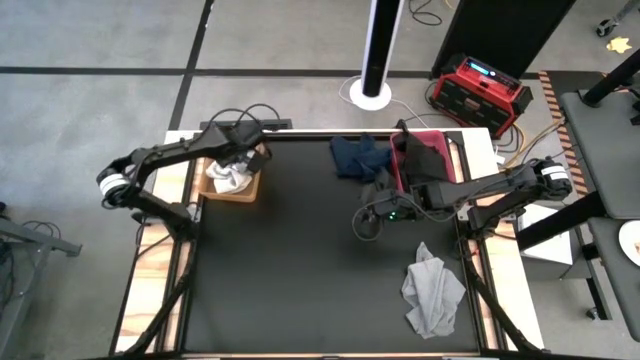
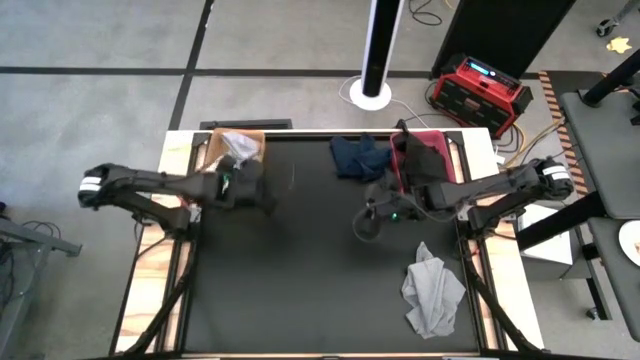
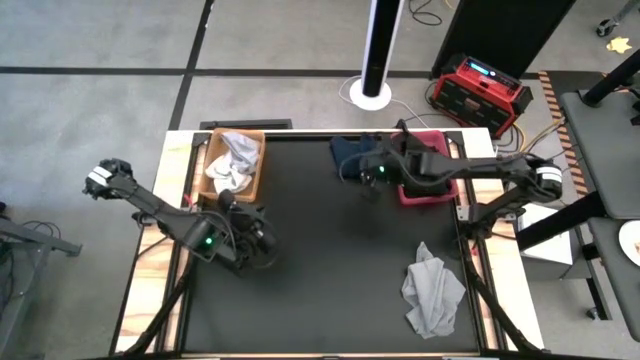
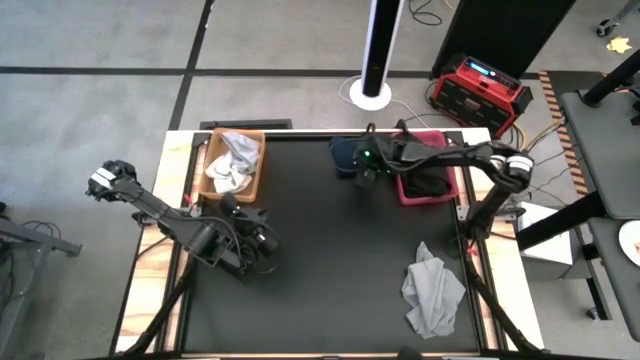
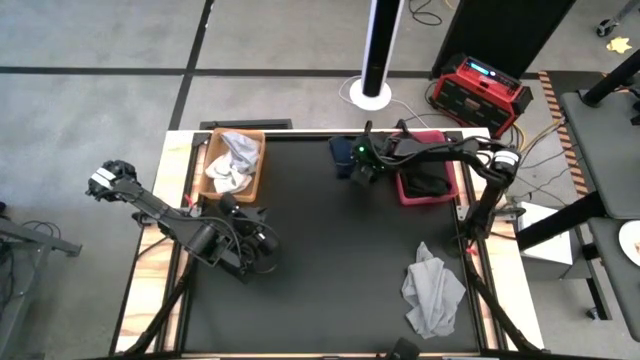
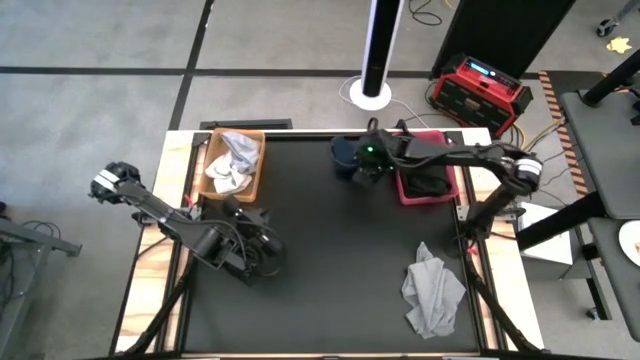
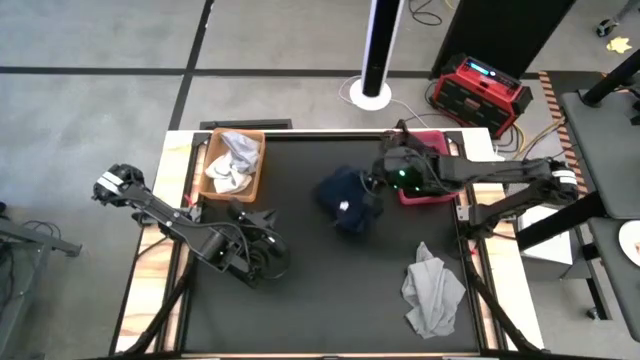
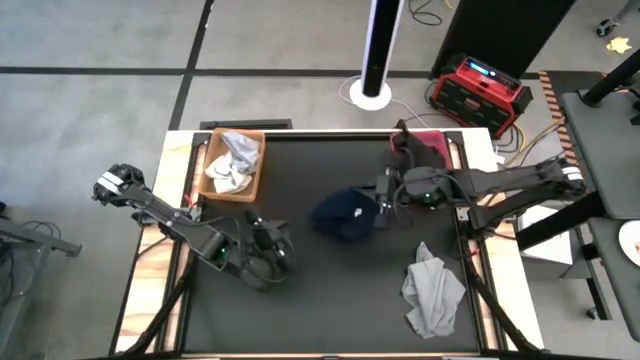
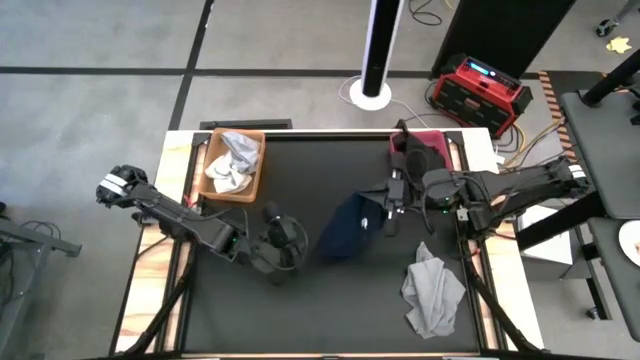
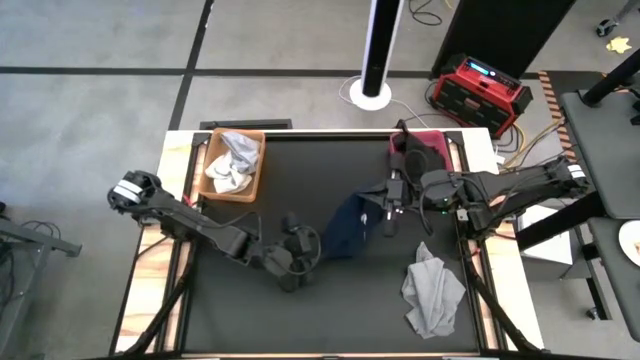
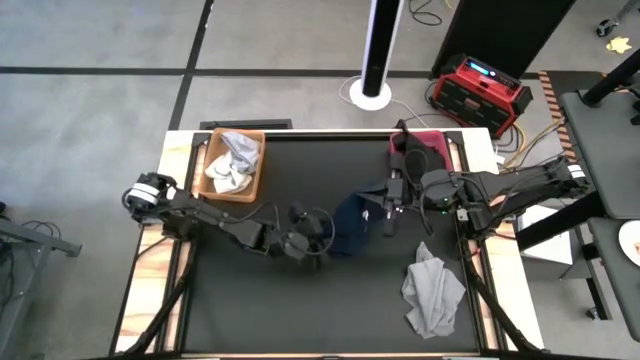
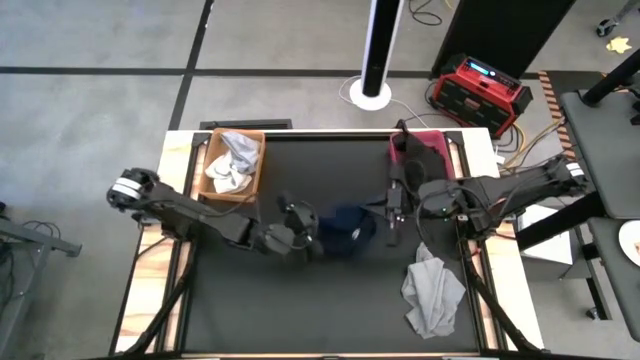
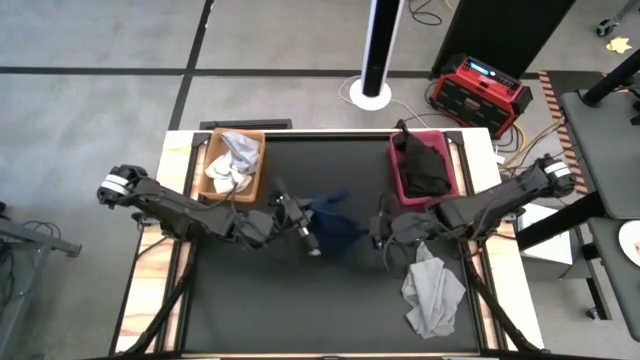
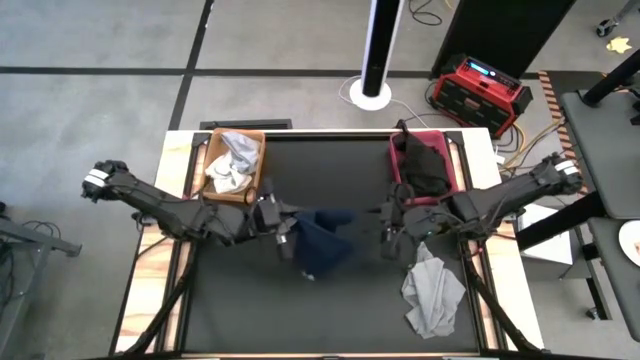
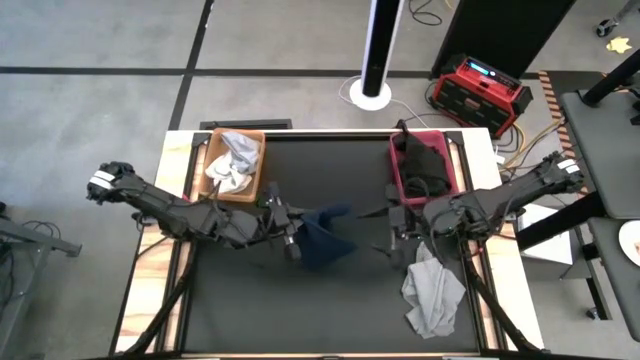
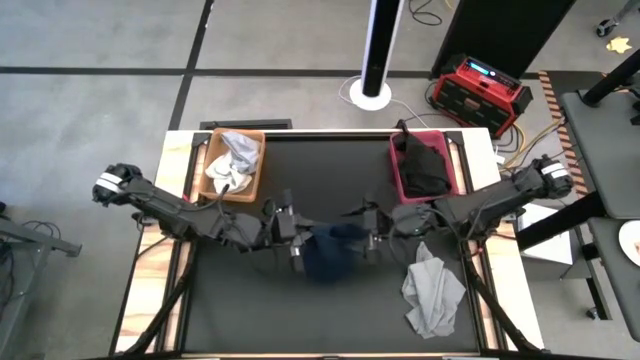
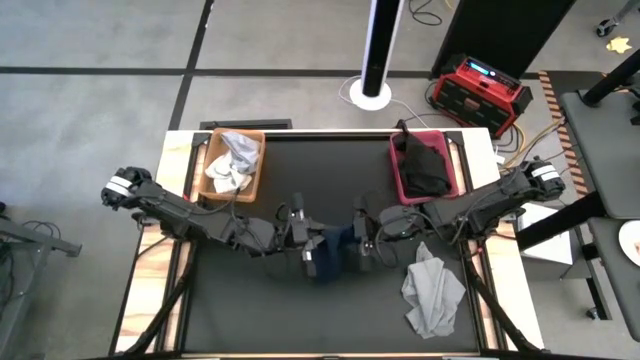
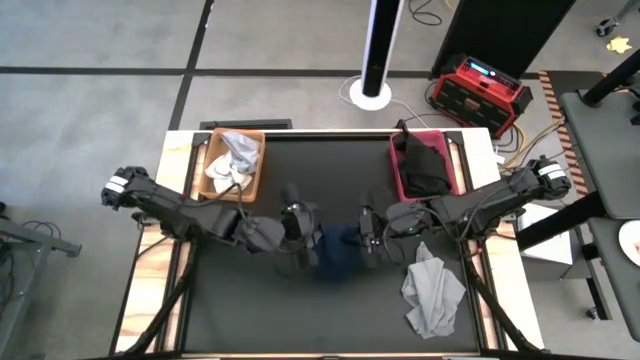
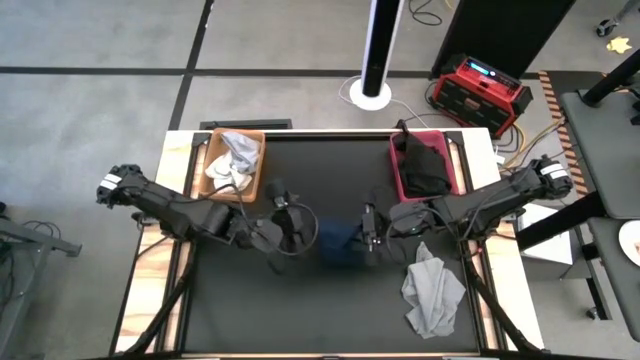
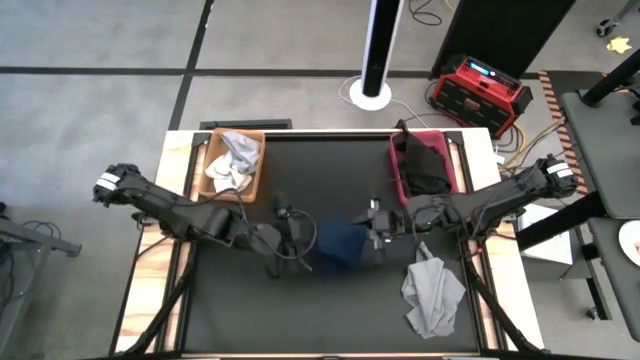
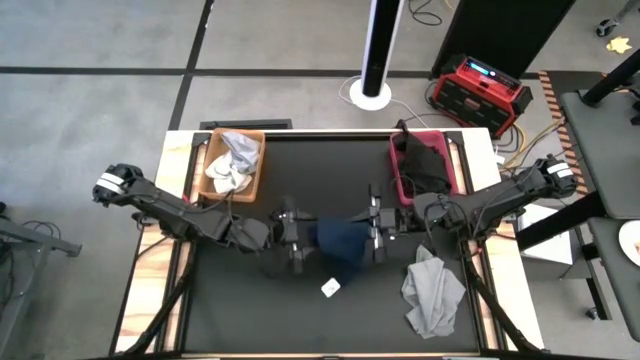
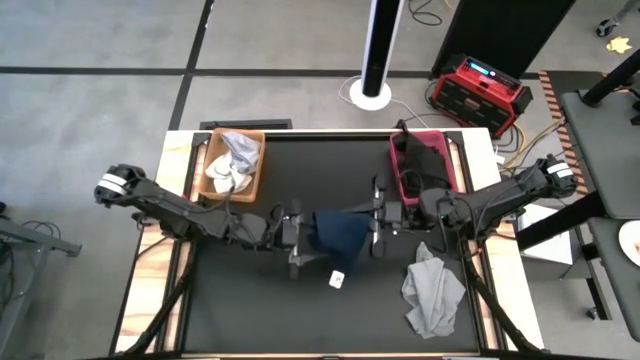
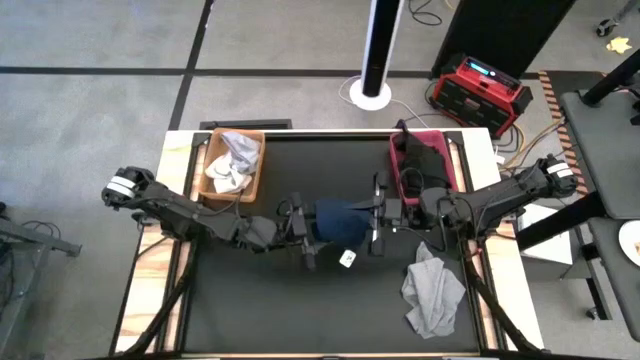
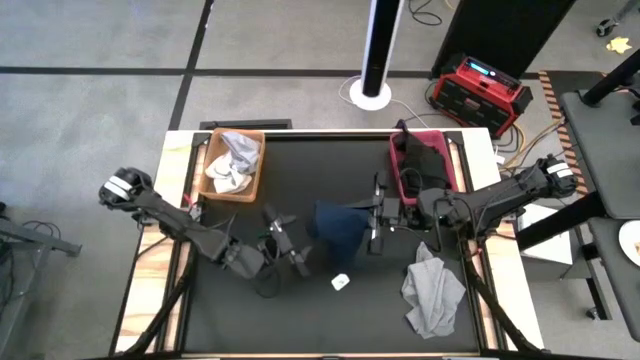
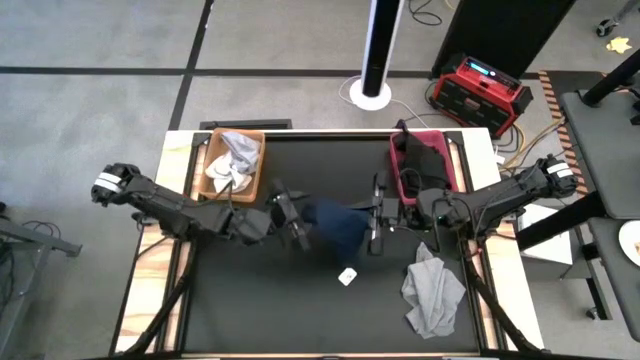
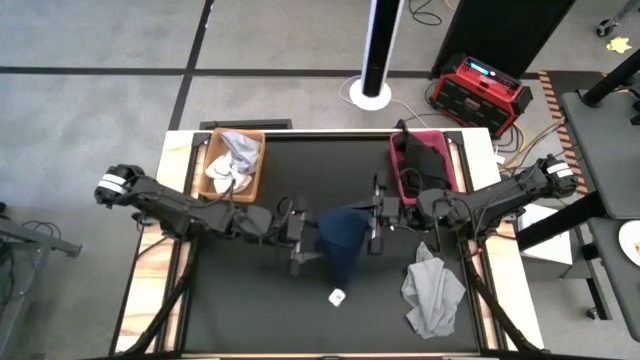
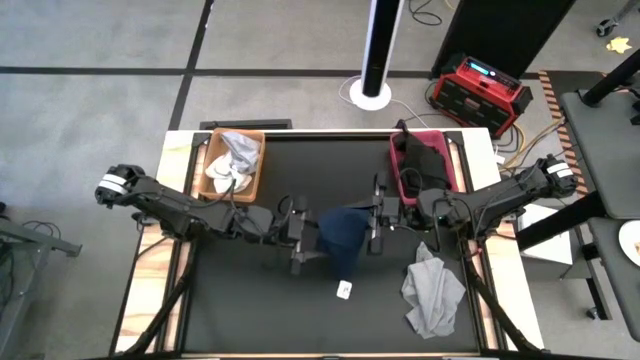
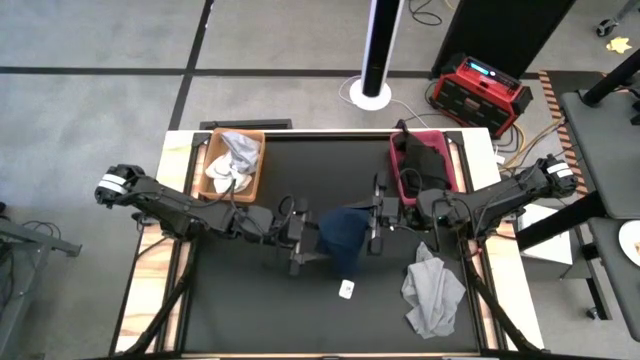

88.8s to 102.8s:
Task: Sort towels by color in basket
Put the blue towel into the red bin

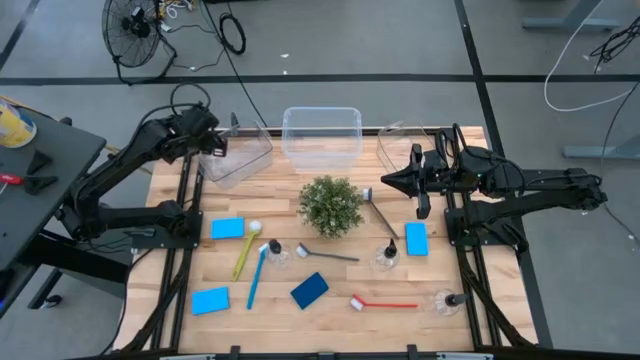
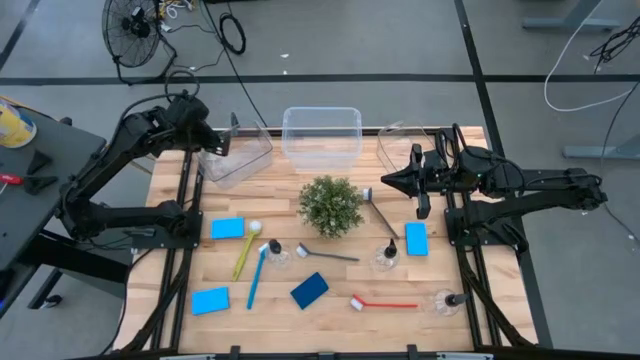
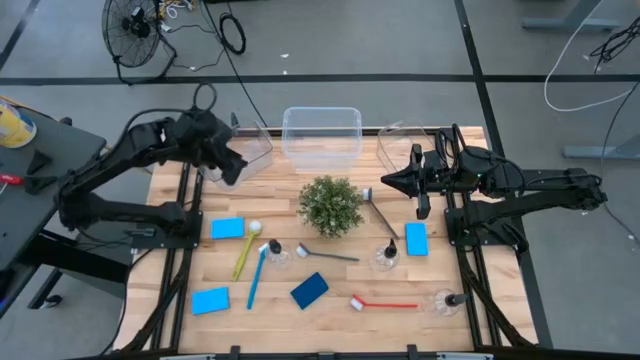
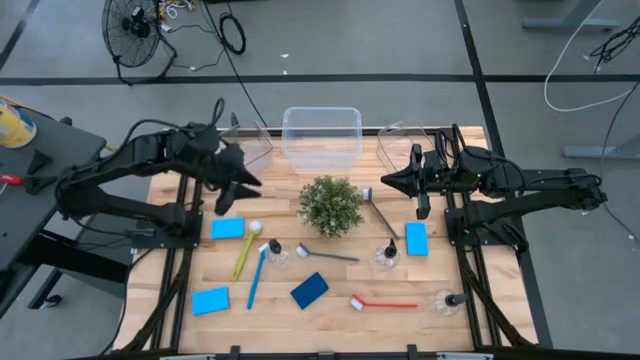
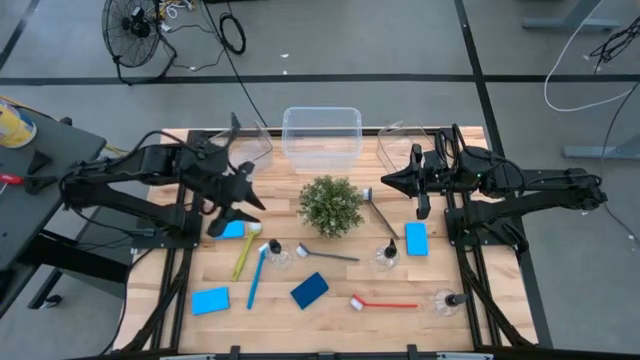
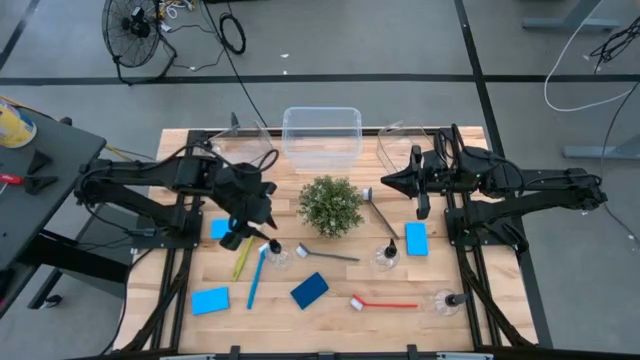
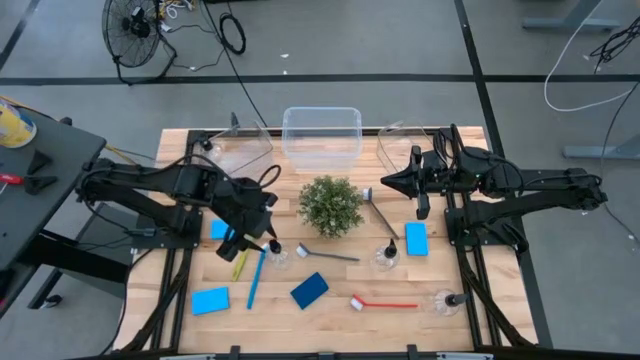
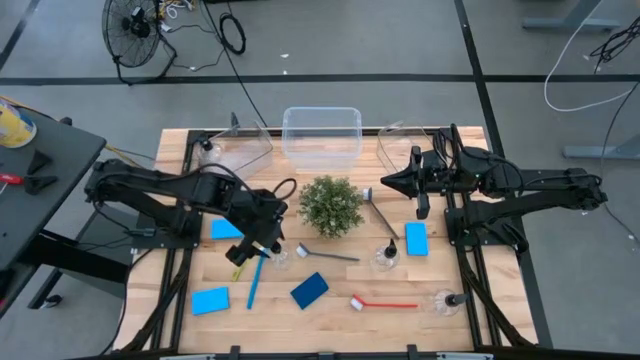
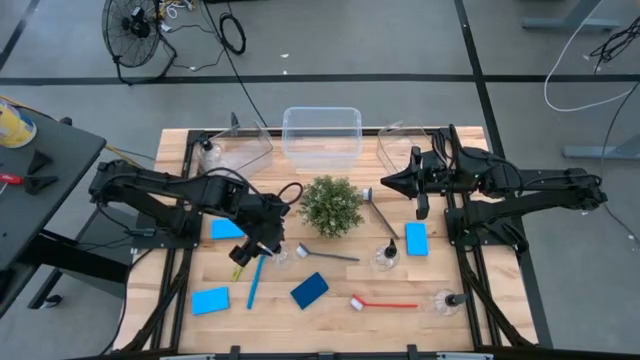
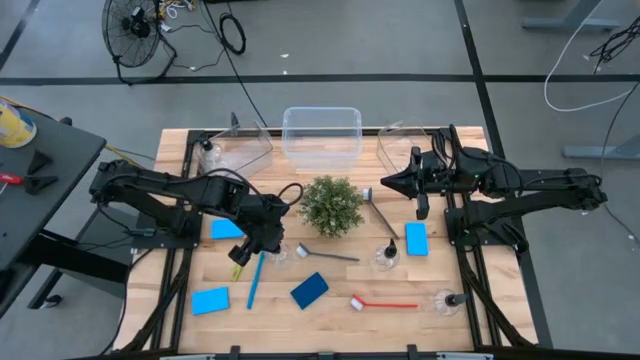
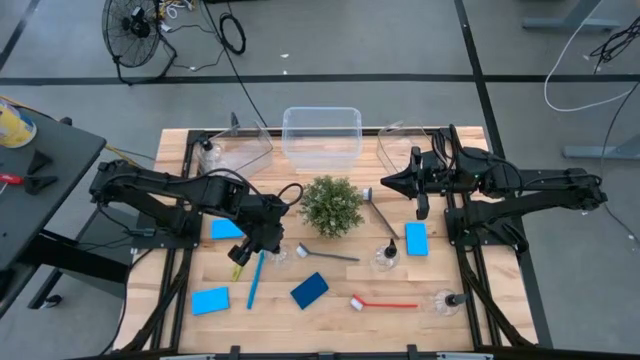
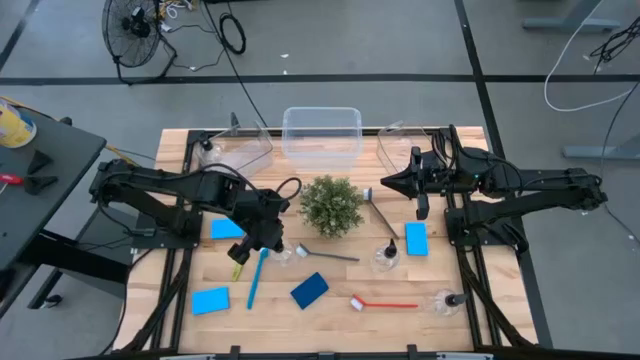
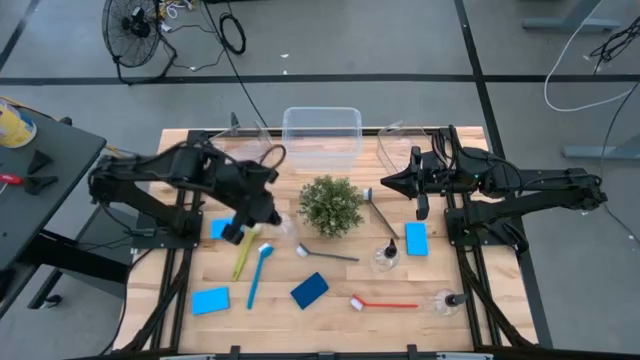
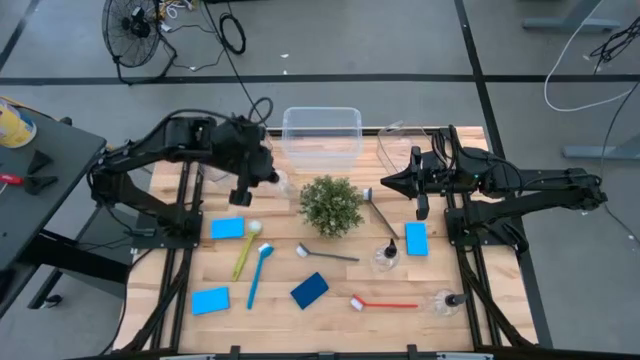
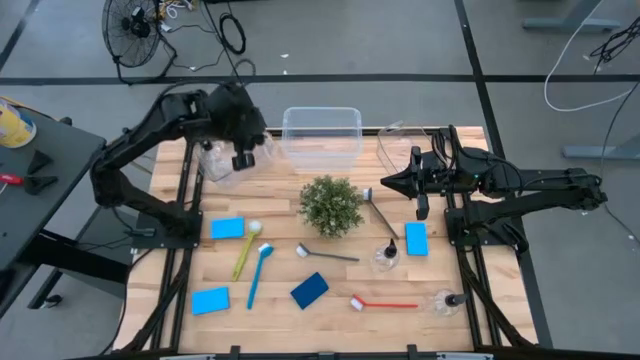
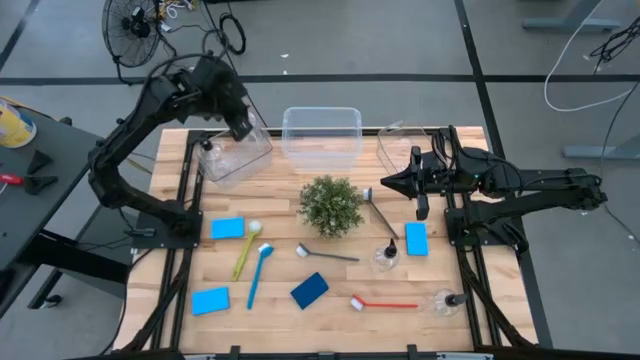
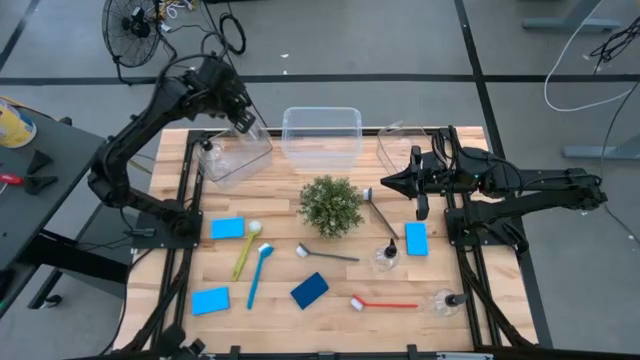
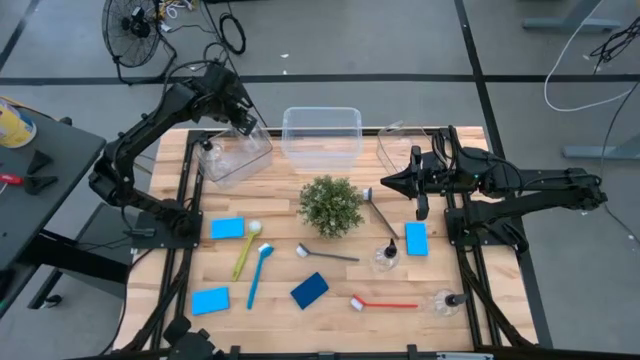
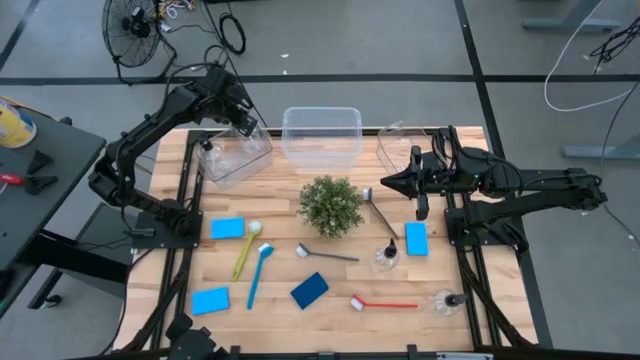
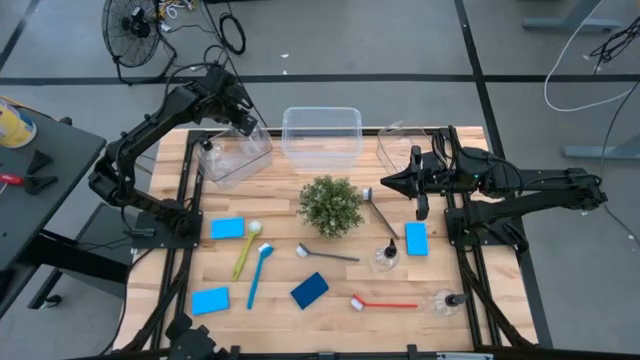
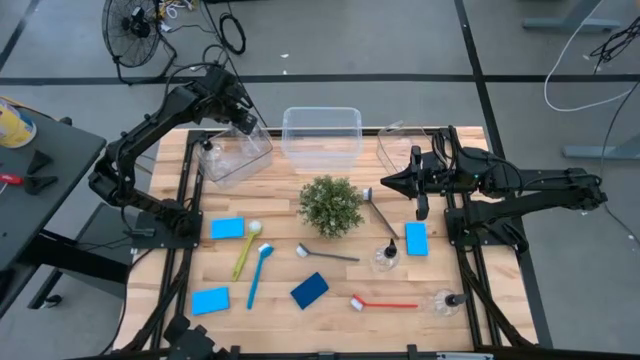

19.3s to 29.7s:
Task: Pick & Place Kitchen Sink Supplies
Put the transparent soap dispenser into the left transparent bin
